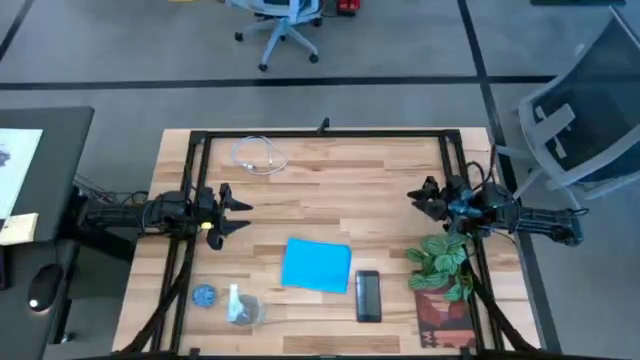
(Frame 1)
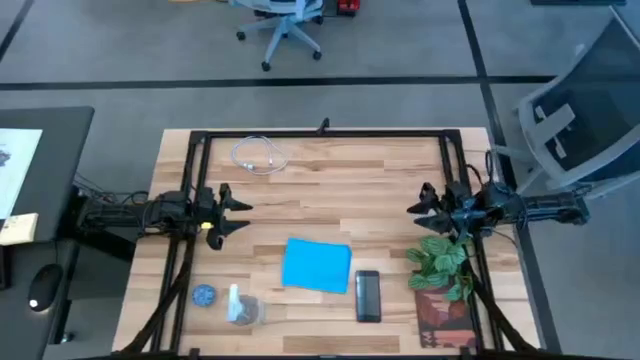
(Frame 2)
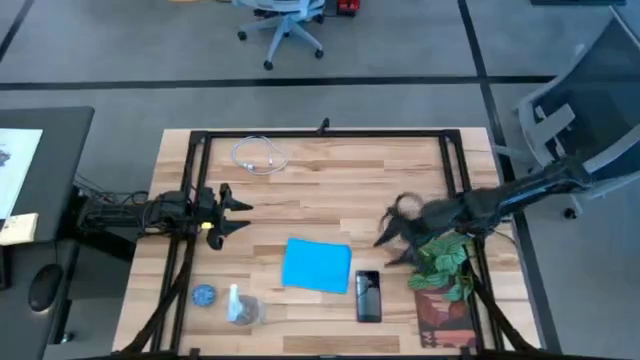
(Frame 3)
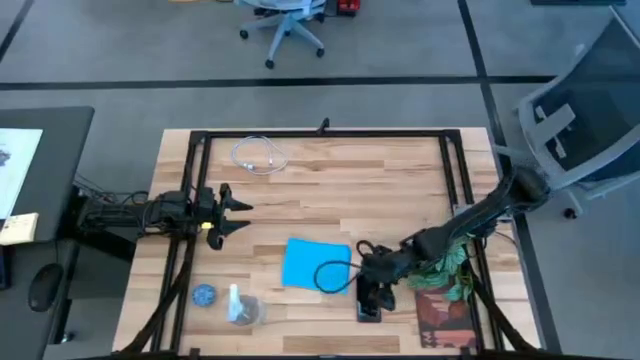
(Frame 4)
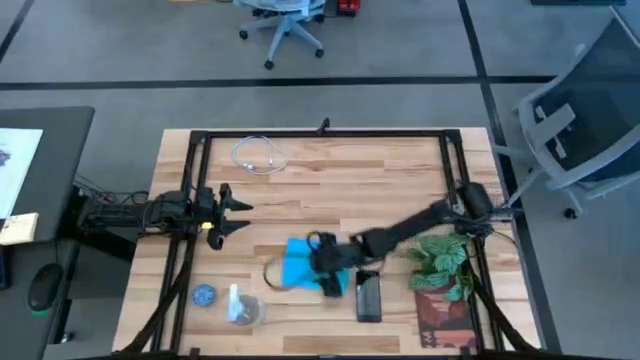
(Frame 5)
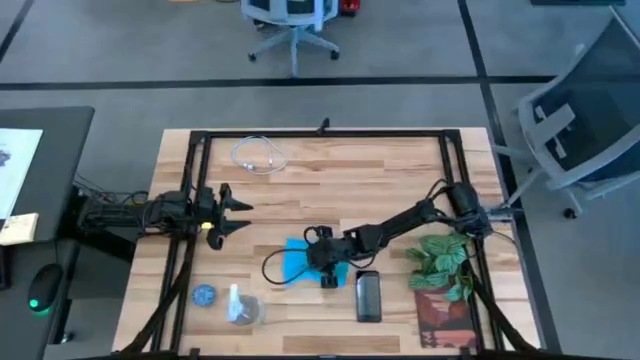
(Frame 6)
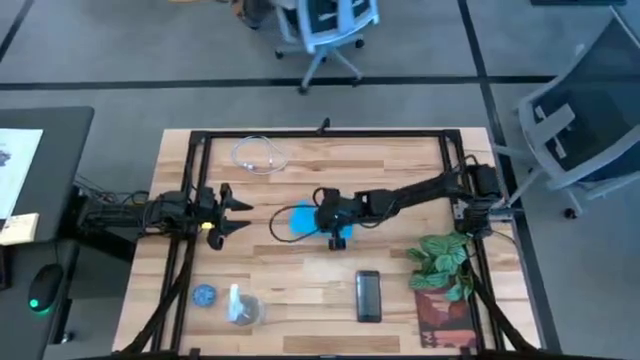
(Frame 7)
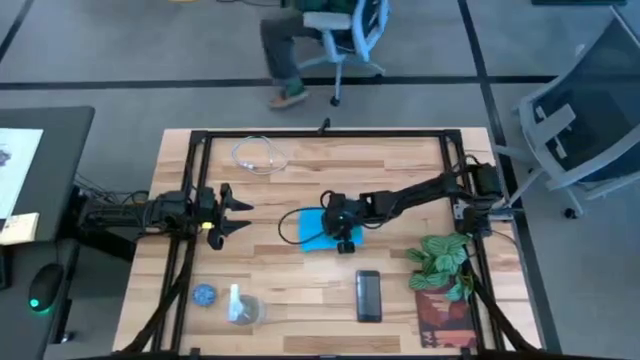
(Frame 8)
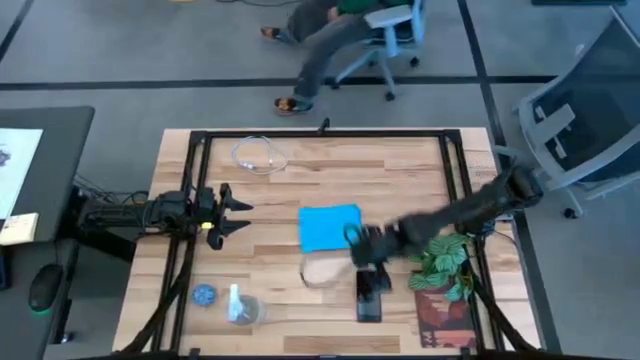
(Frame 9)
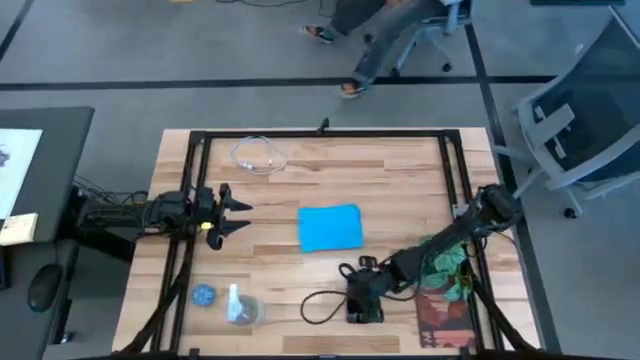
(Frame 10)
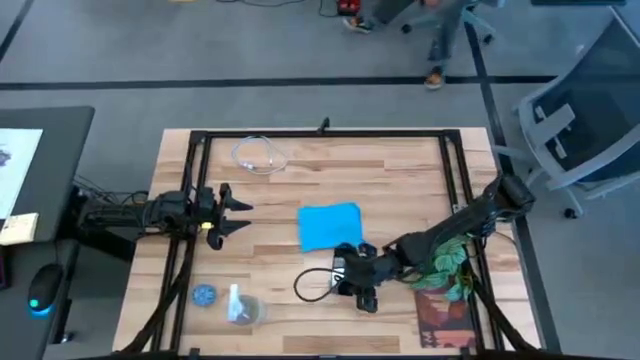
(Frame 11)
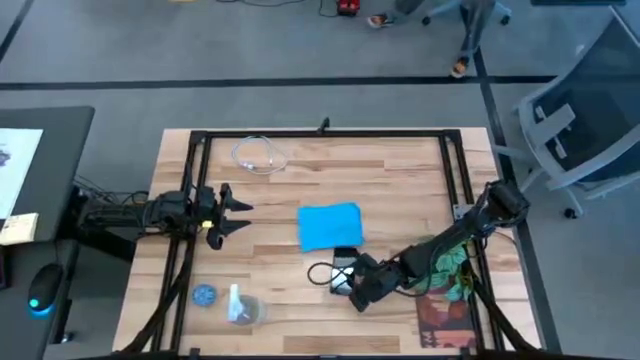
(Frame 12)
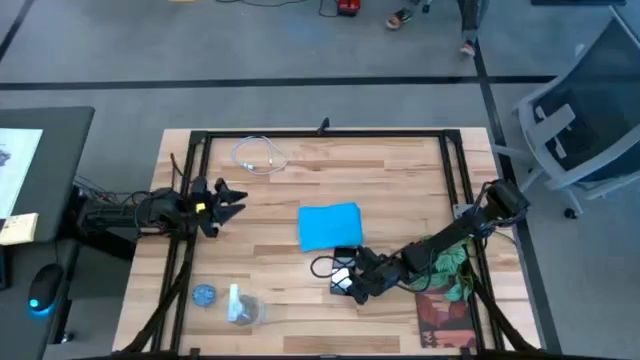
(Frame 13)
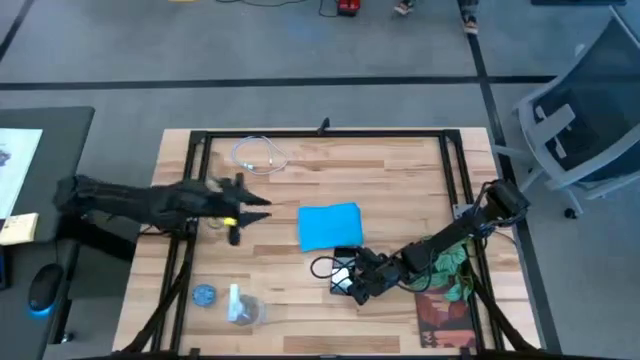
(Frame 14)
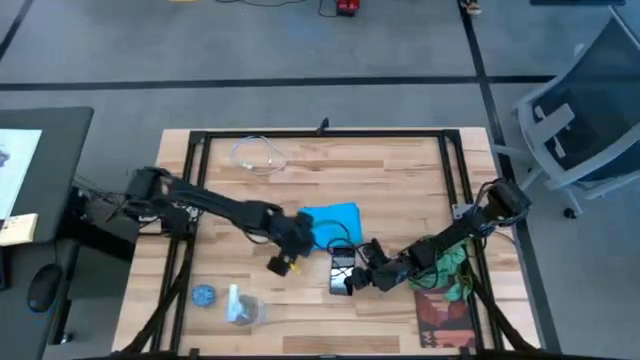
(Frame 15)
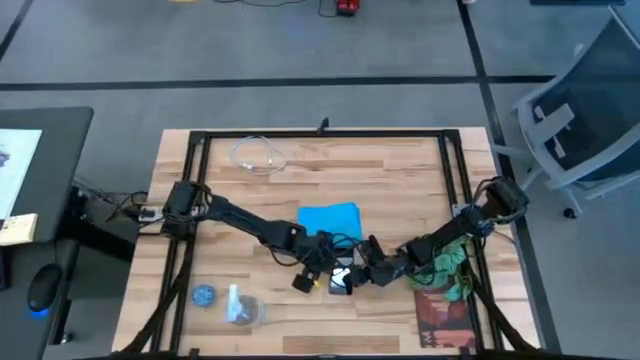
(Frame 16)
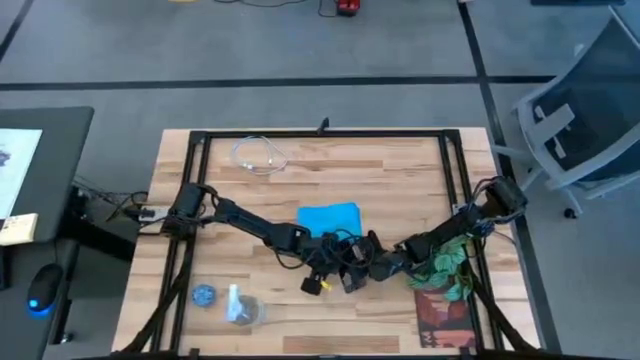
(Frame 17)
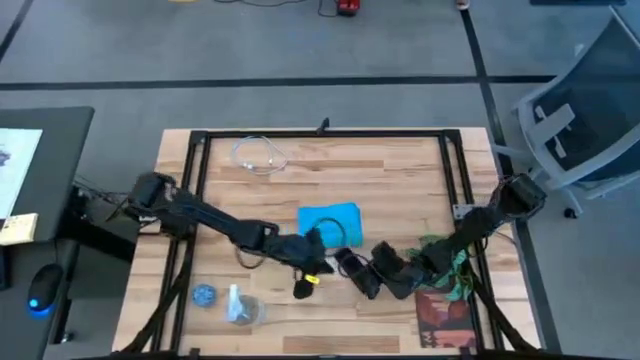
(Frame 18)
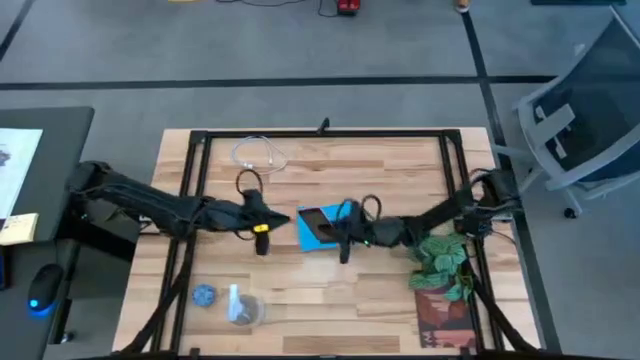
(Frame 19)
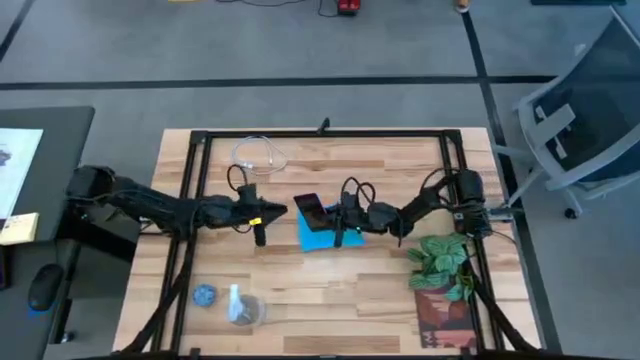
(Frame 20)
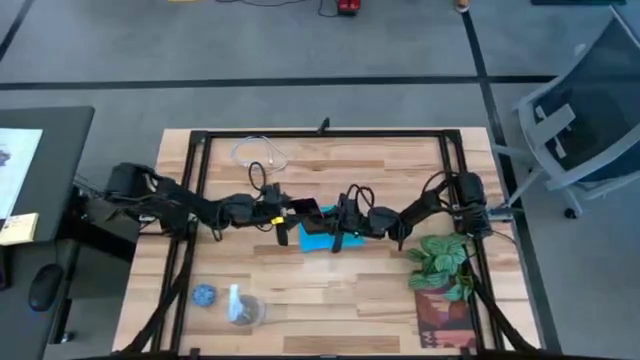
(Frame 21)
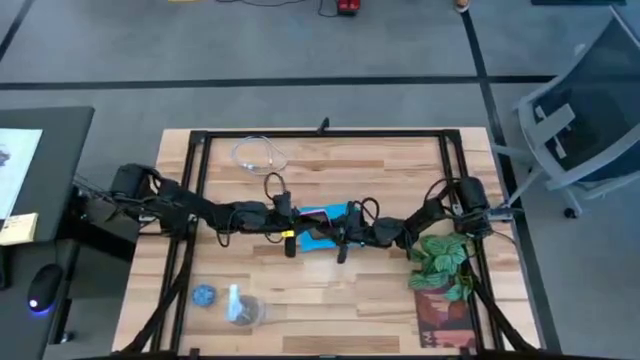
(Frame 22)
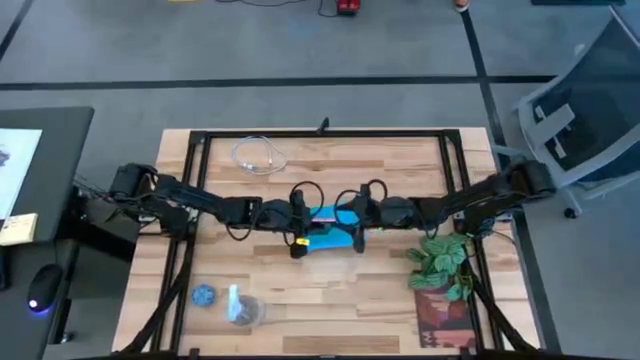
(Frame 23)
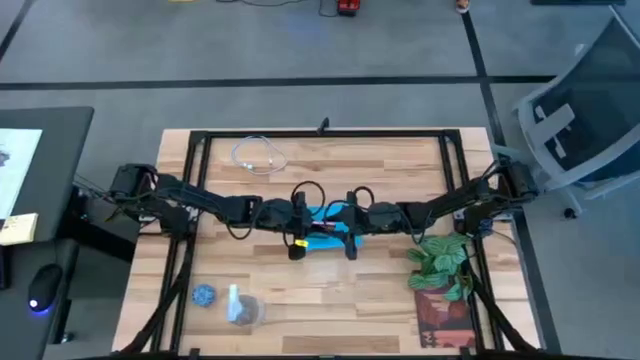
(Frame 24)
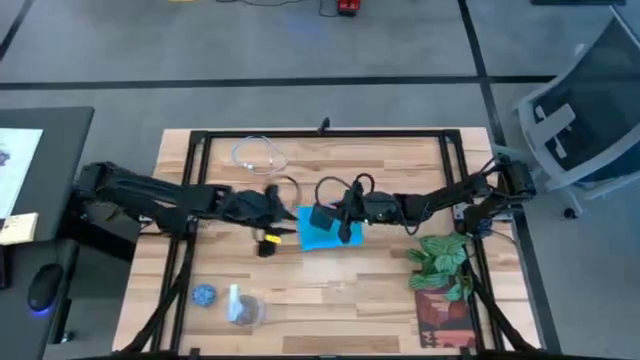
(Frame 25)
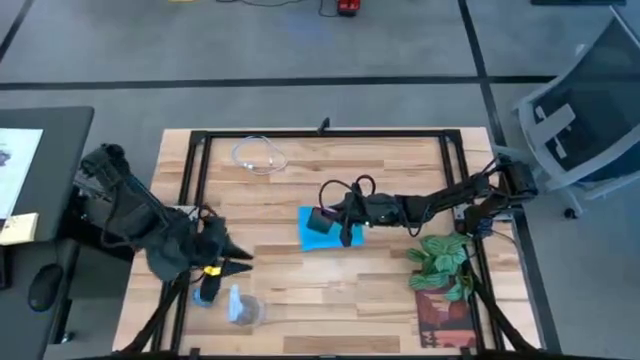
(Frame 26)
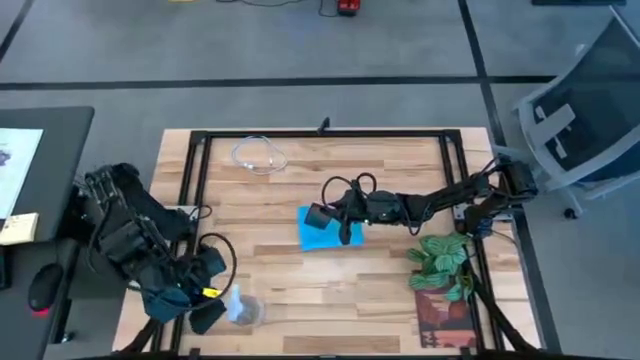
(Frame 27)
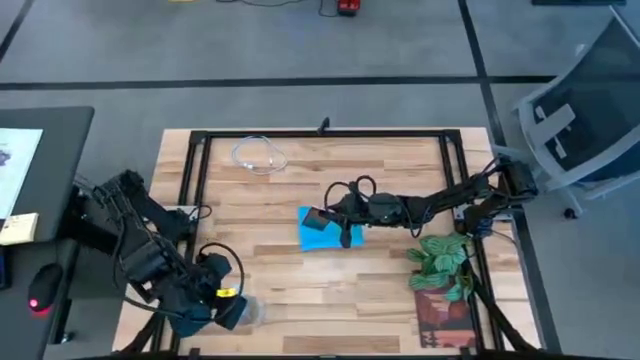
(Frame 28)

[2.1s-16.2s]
Task: Apply microfiber cloth
Spray the front cellphone using the spray bottle

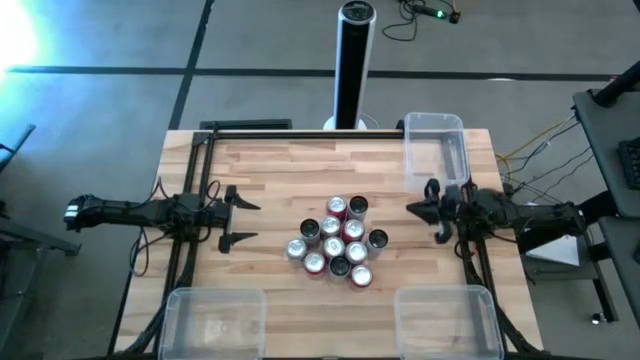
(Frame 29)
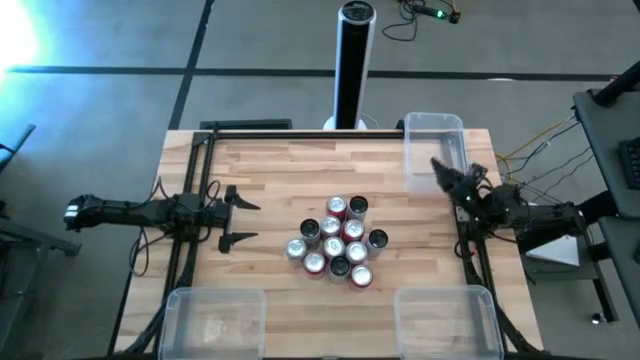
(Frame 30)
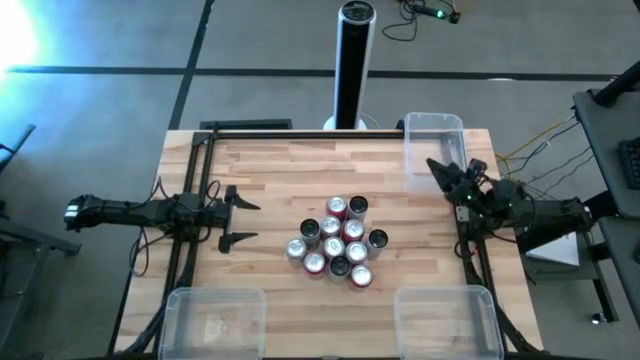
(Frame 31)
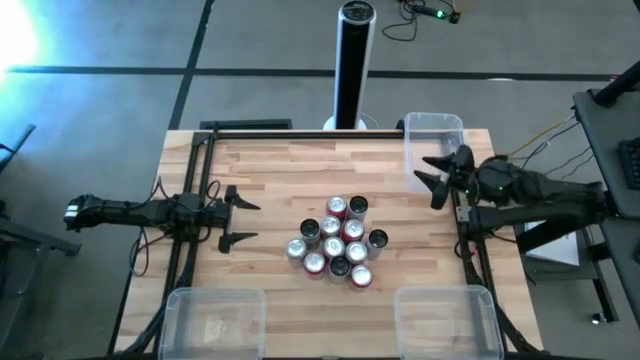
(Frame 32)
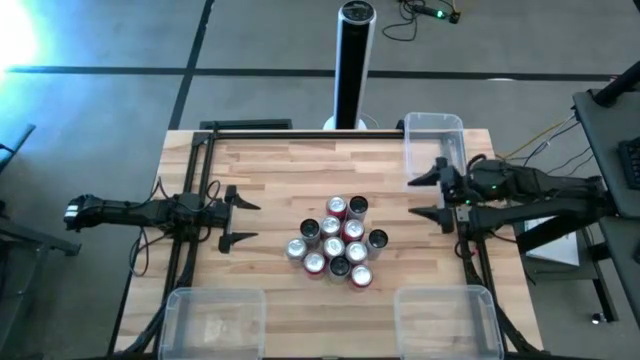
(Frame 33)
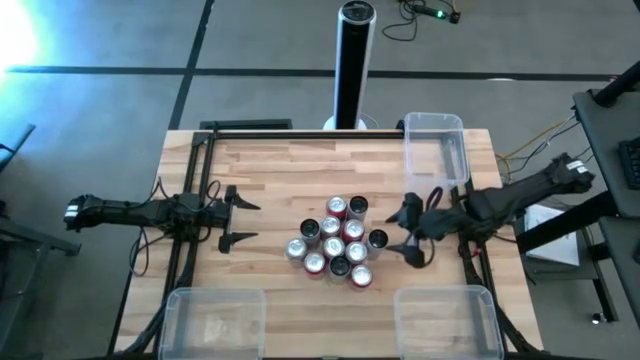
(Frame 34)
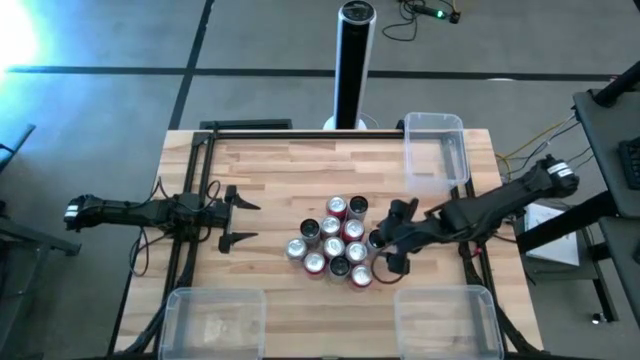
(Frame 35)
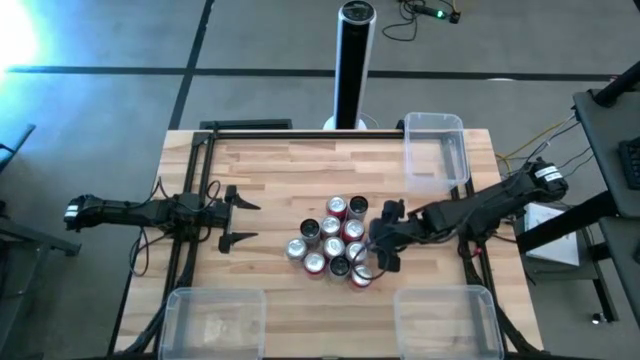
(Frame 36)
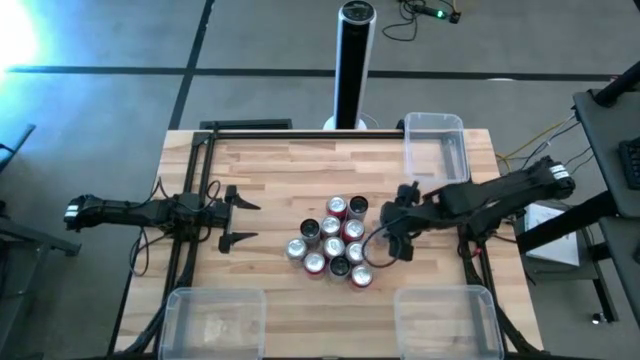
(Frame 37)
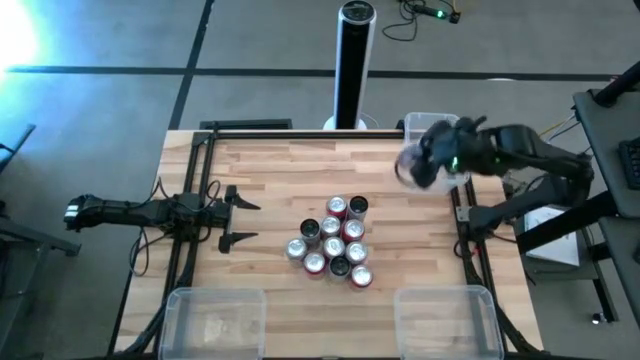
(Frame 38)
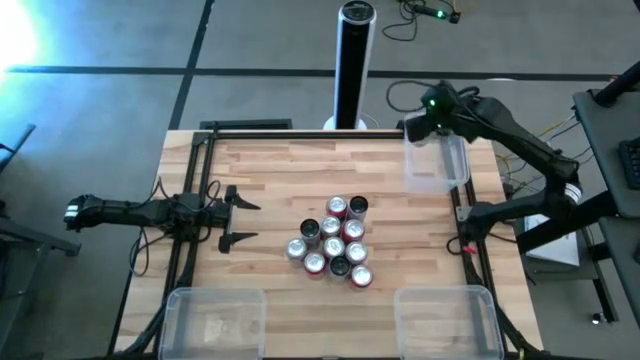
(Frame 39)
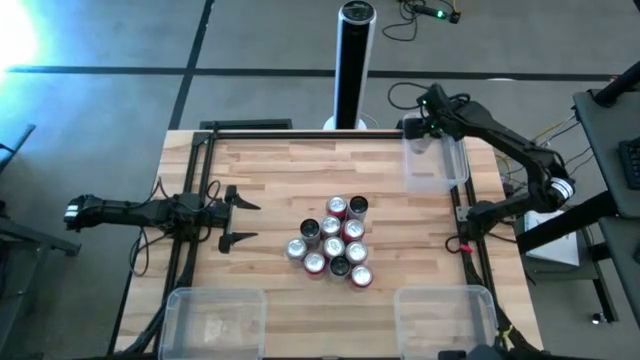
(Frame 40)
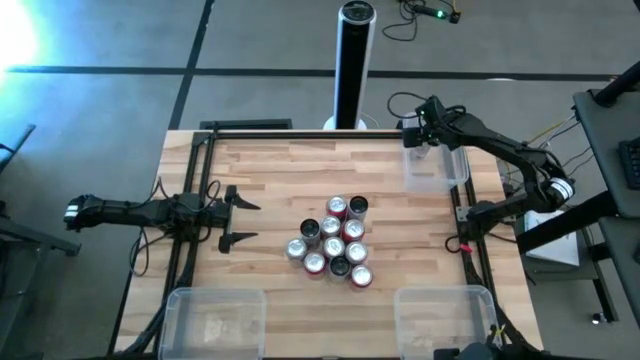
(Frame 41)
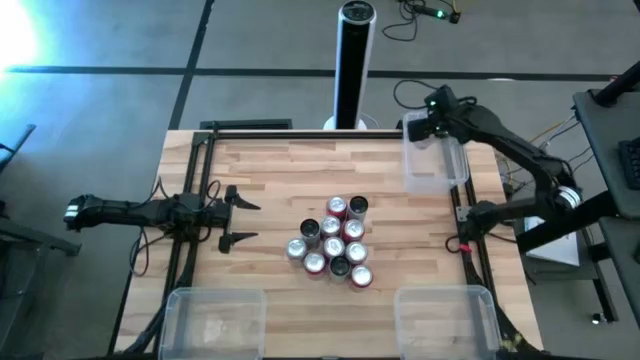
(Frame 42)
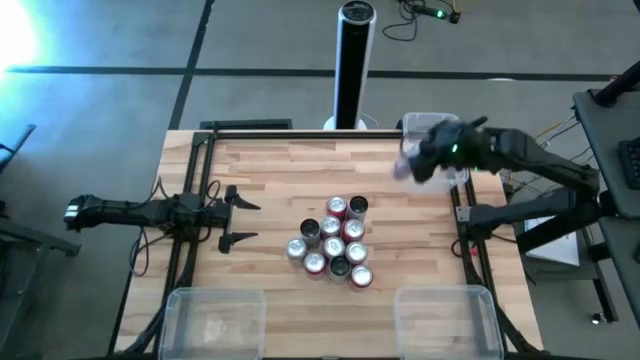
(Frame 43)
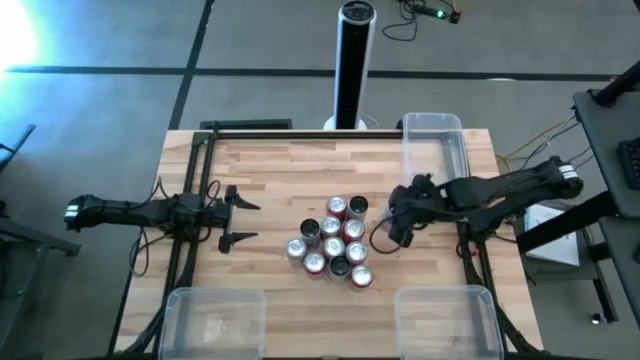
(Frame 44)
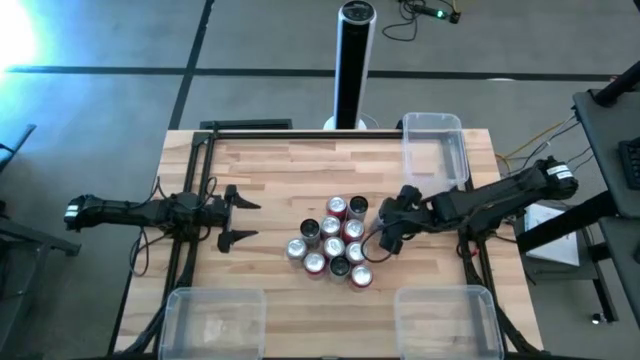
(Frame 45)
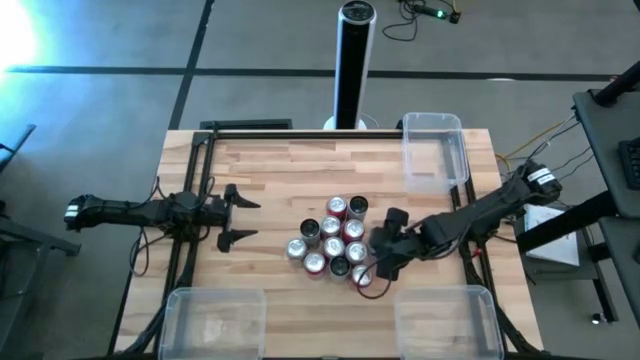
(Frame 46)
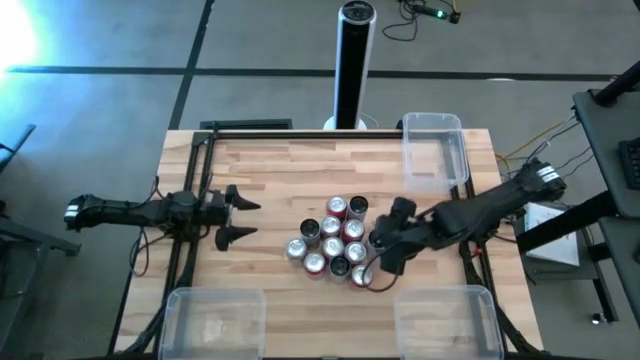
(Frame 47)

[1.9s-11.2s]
Task: Sort soda cans
Put the white-pink soda can into the top right white bin
